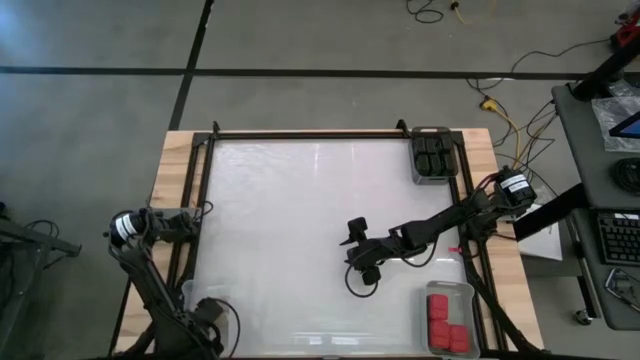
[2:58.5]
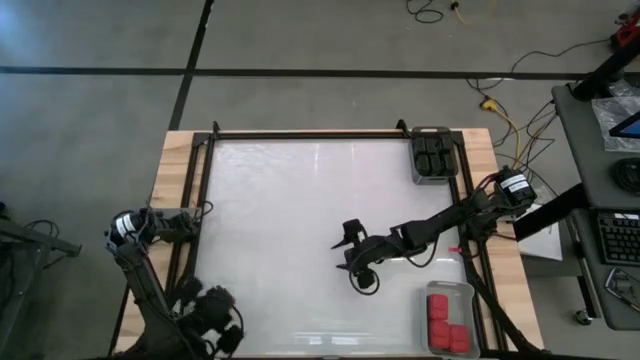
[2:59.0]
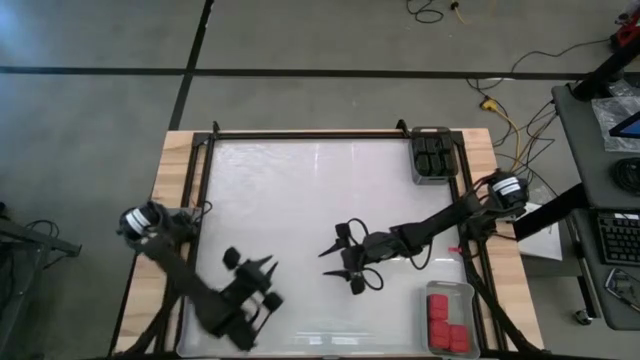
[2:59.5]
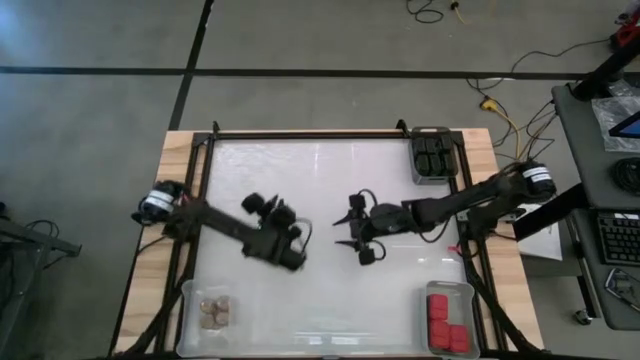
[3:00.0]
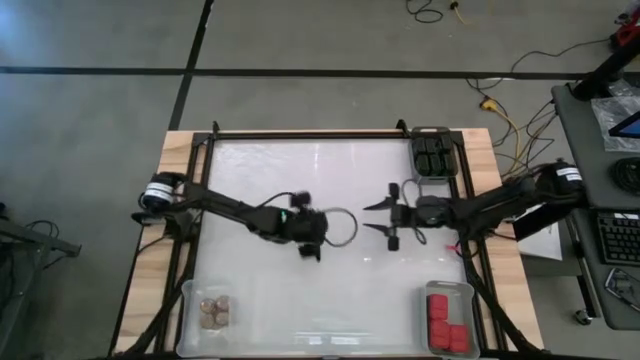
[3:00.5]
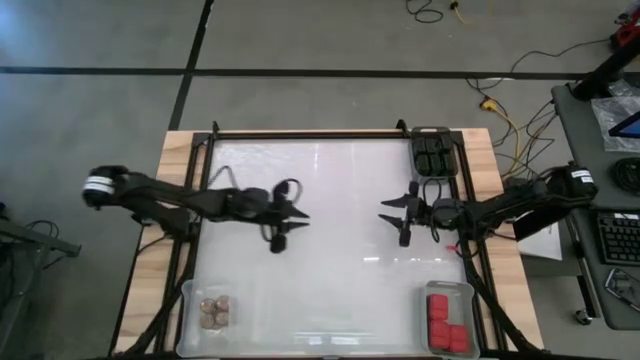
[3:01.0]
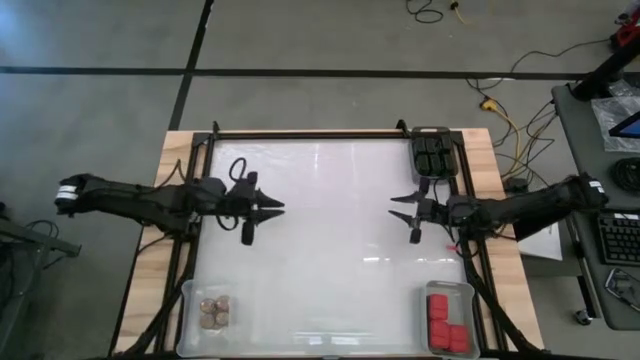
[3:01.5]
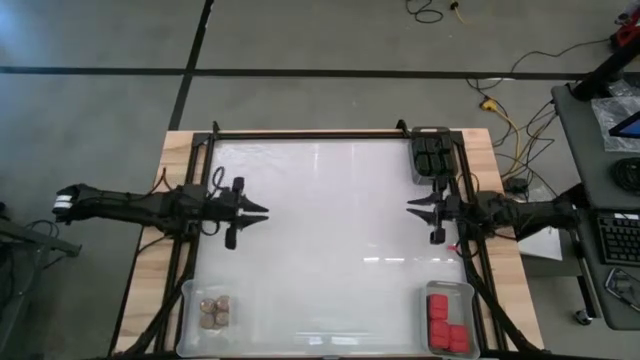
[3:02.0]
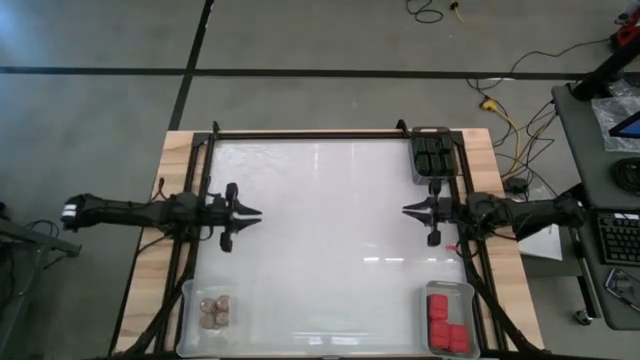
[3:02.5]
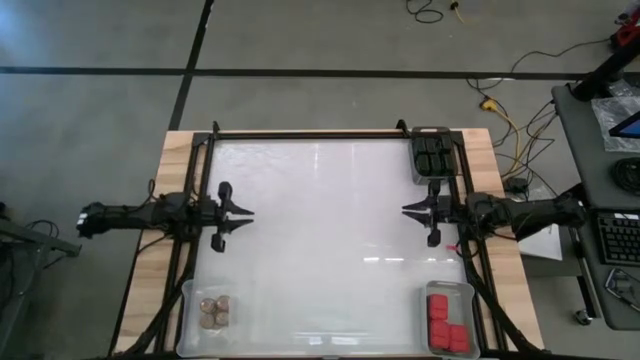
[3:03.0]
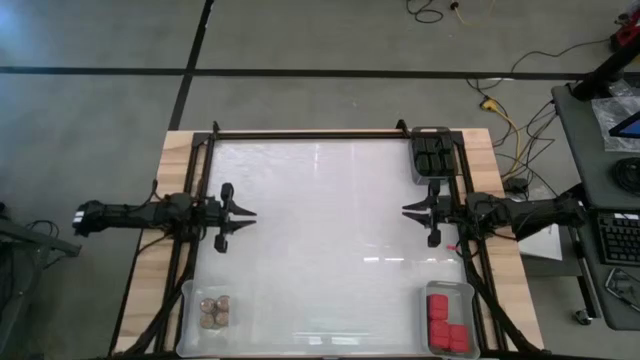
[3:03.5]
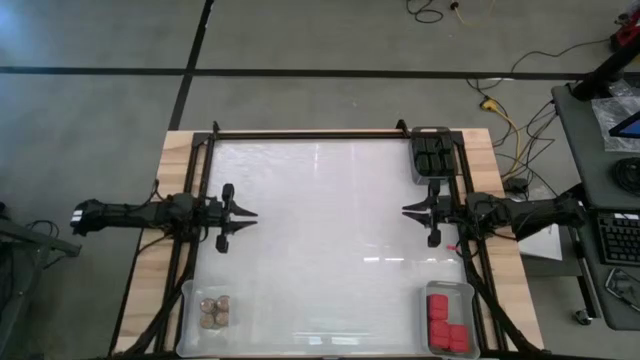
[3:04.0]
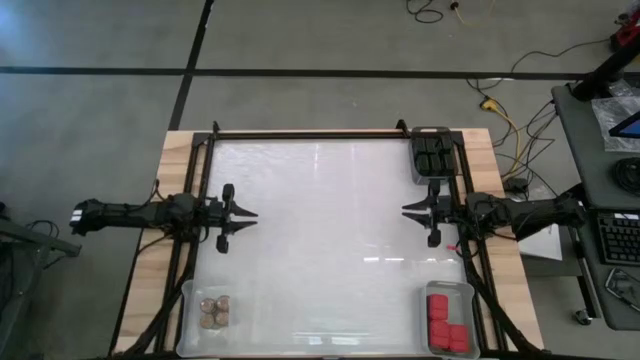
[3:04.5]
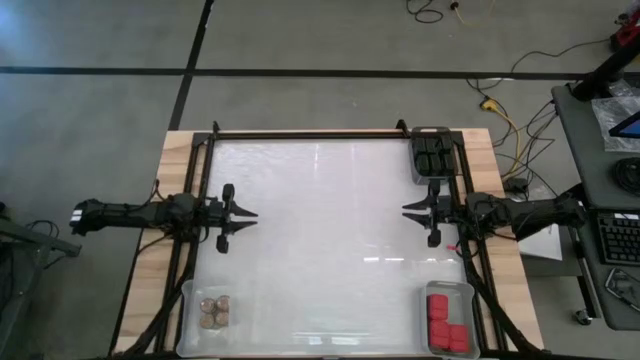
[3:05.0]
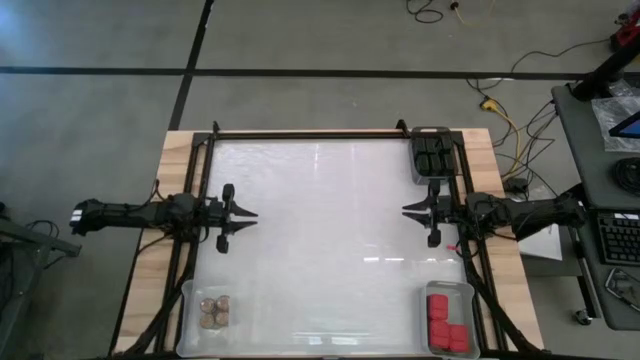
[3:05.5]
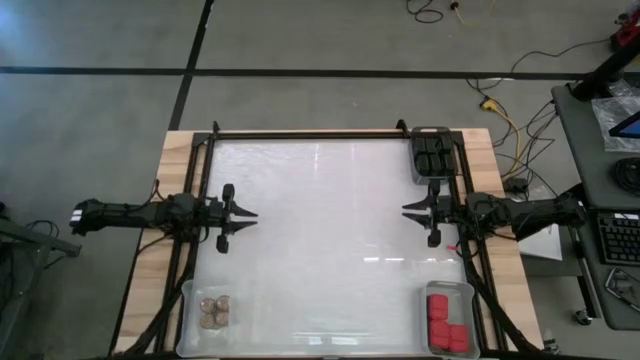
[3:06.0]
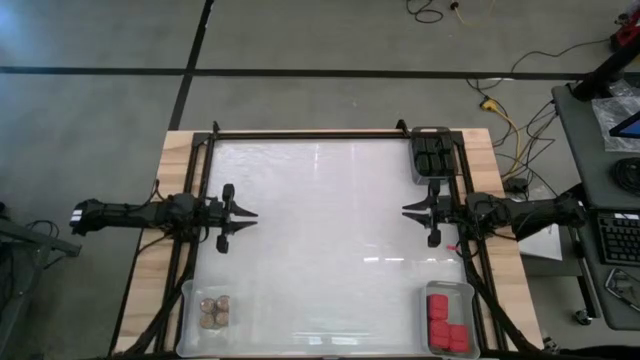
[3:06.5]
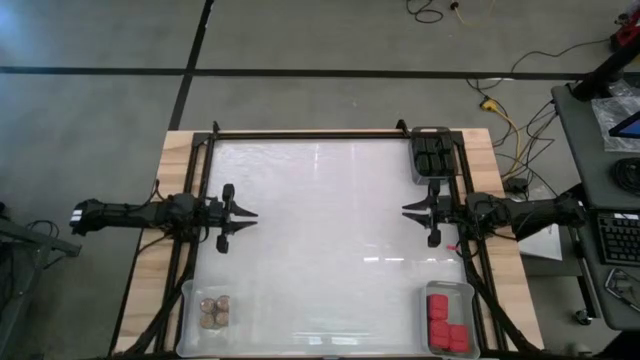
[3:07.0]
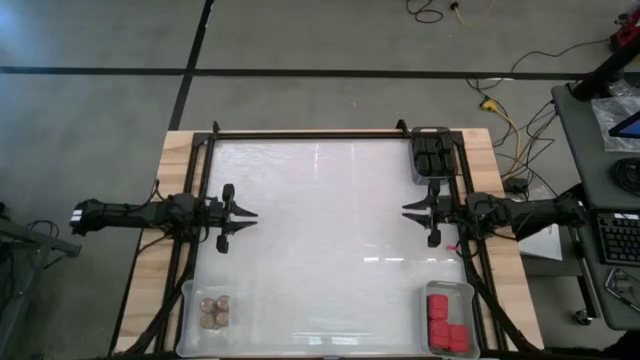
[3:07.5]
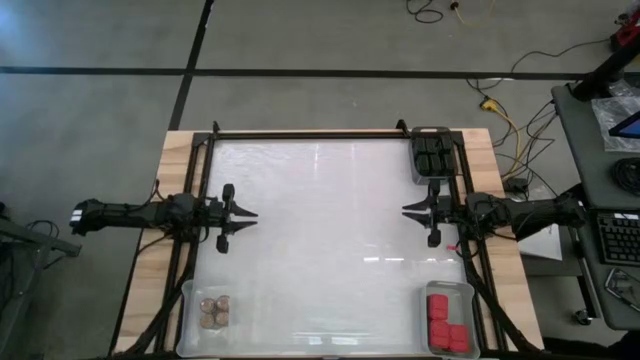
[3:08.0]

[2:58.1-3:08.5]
Task: Sort spices by type
Return to Home Position

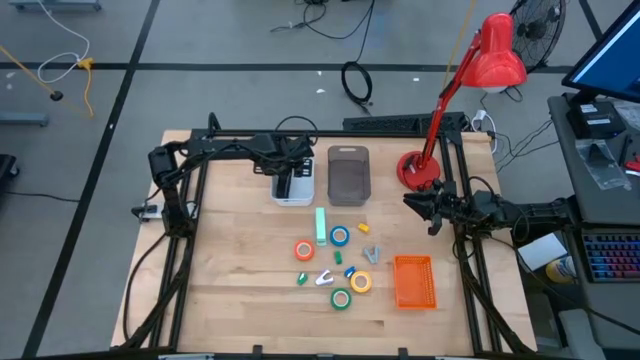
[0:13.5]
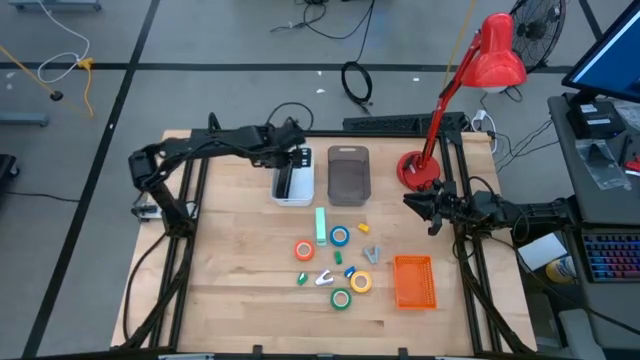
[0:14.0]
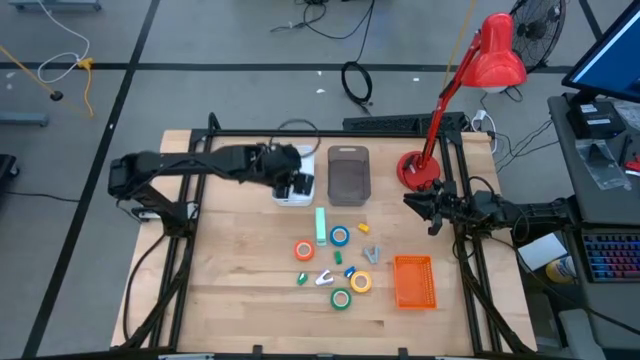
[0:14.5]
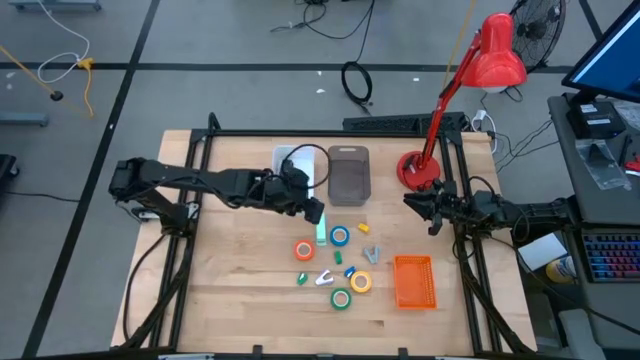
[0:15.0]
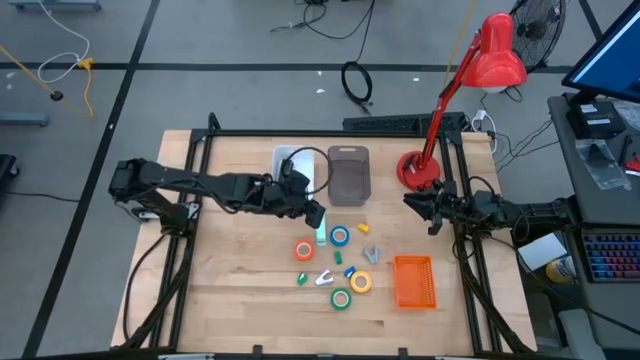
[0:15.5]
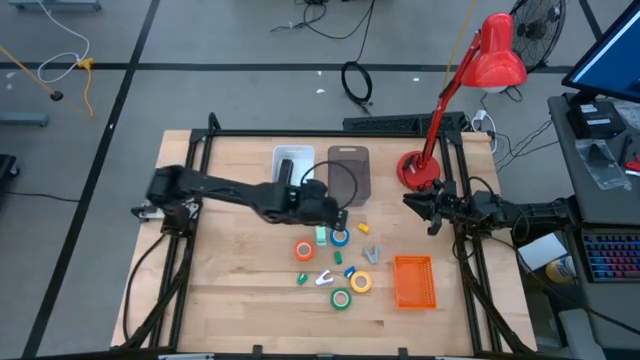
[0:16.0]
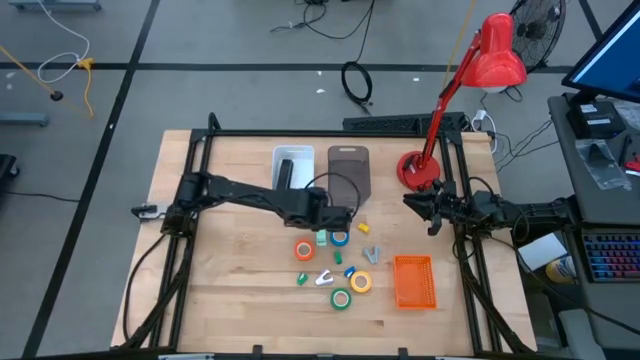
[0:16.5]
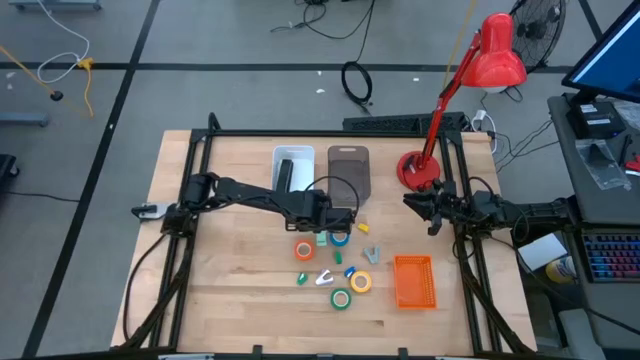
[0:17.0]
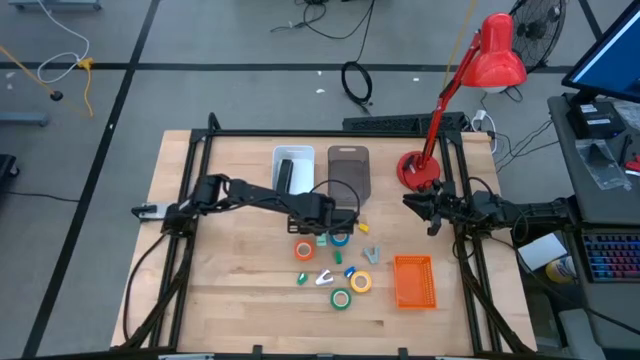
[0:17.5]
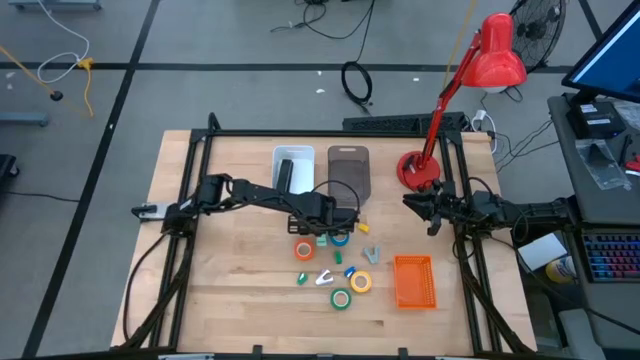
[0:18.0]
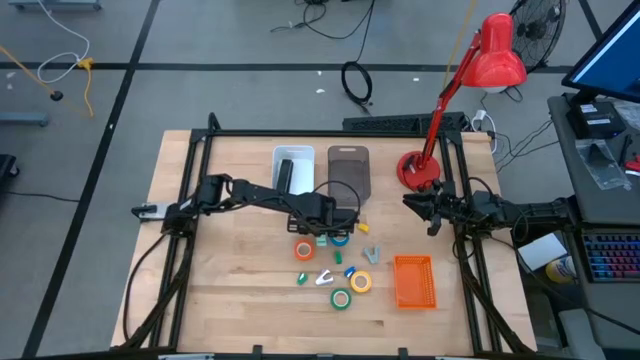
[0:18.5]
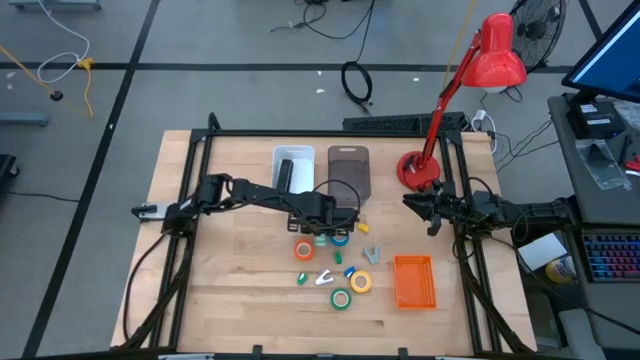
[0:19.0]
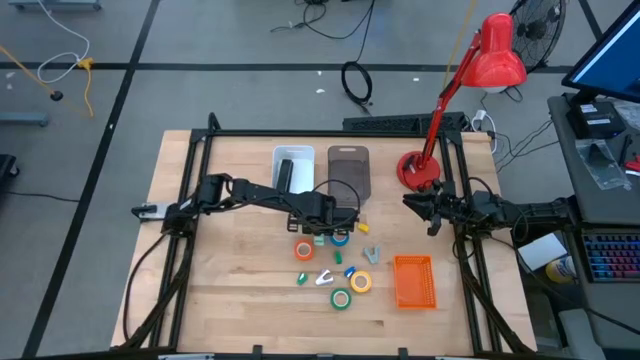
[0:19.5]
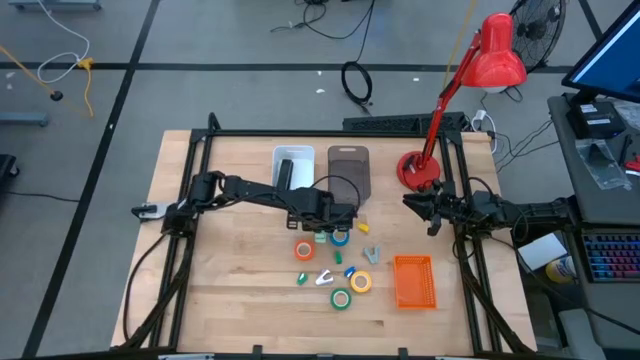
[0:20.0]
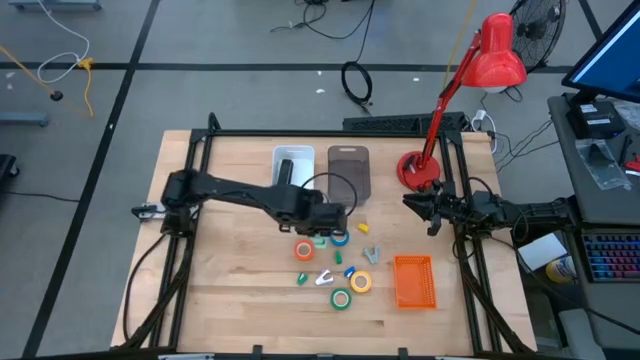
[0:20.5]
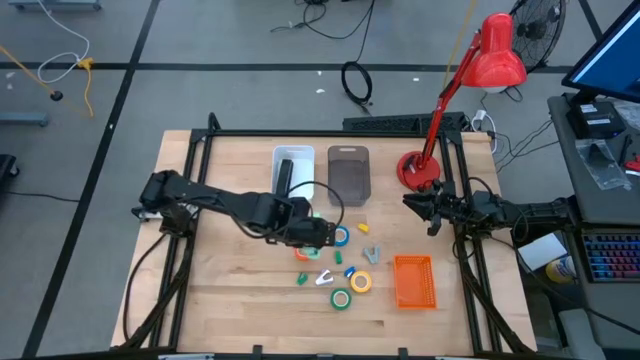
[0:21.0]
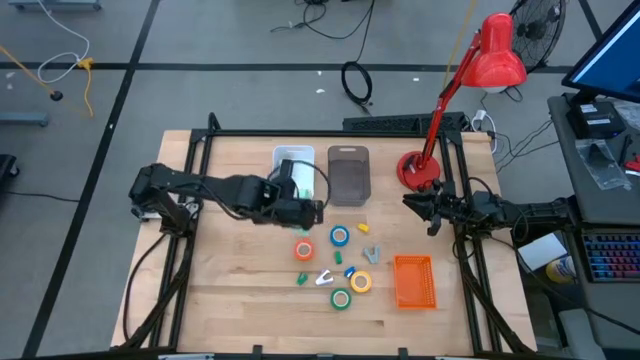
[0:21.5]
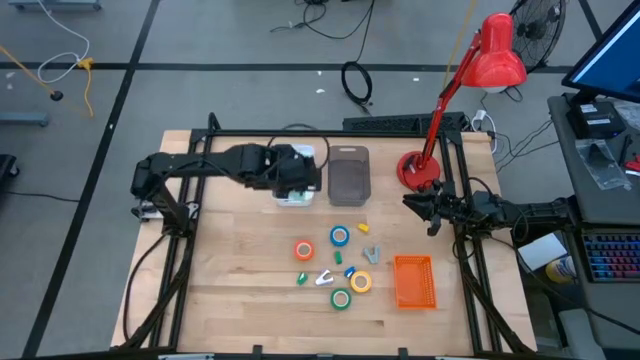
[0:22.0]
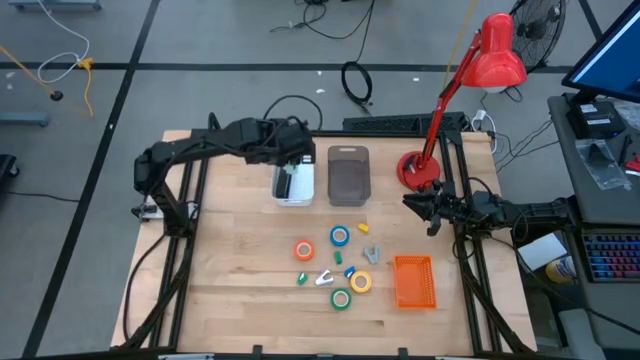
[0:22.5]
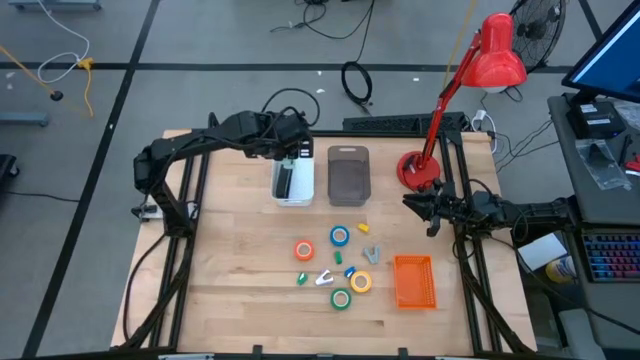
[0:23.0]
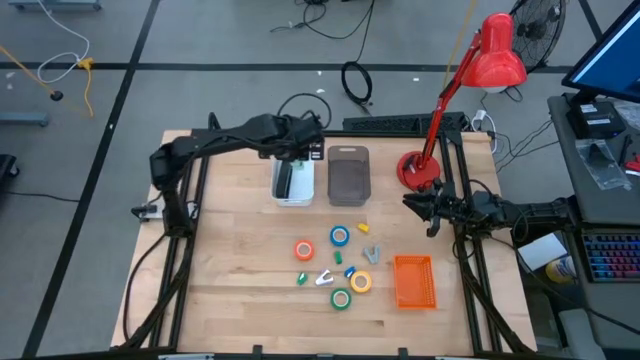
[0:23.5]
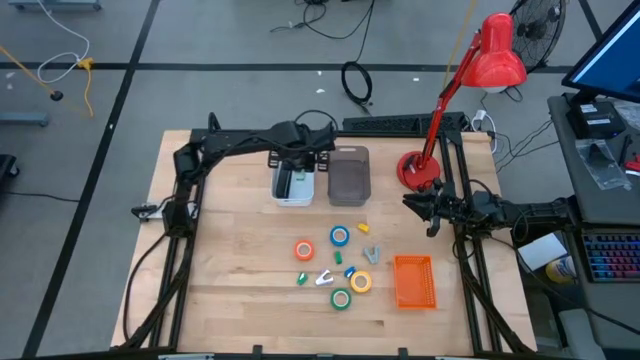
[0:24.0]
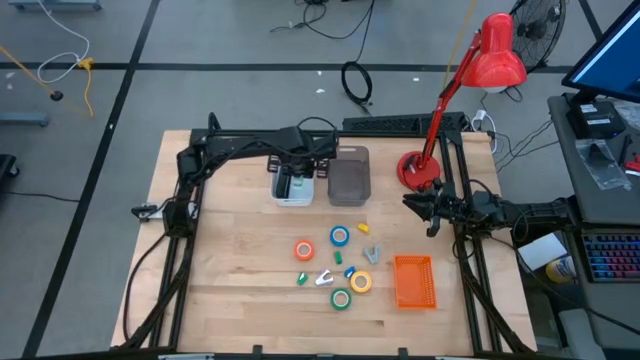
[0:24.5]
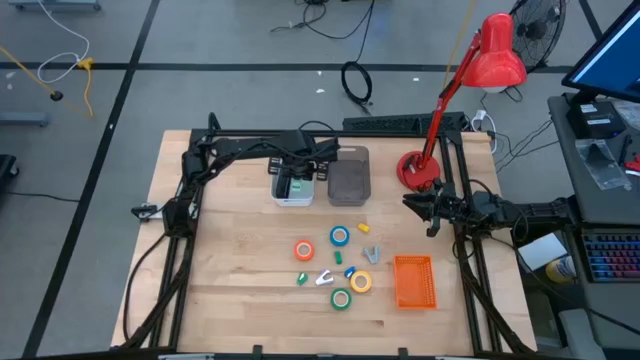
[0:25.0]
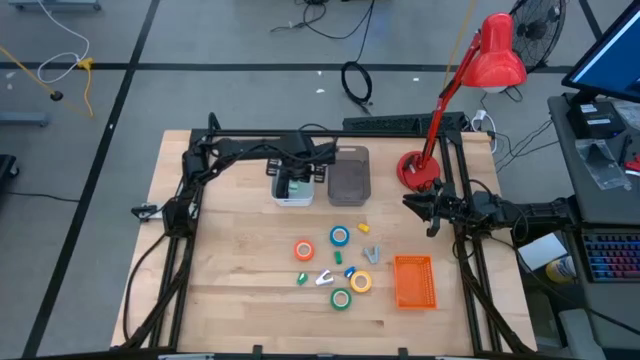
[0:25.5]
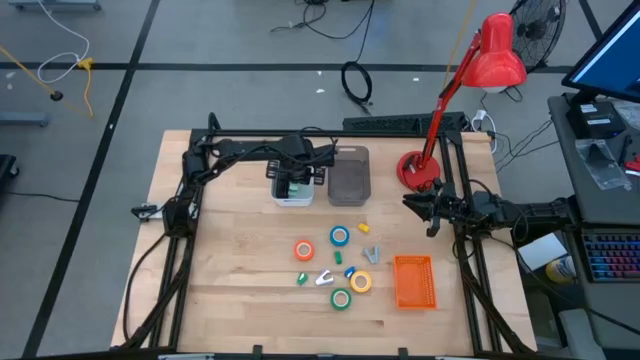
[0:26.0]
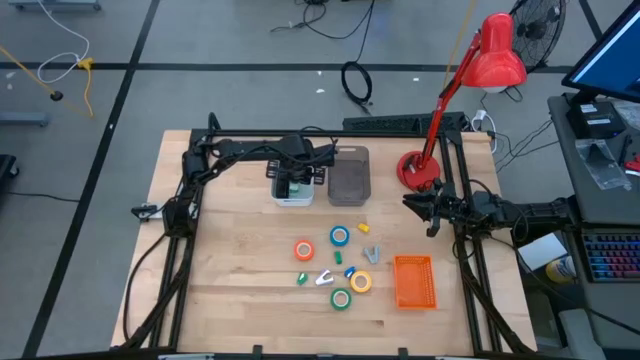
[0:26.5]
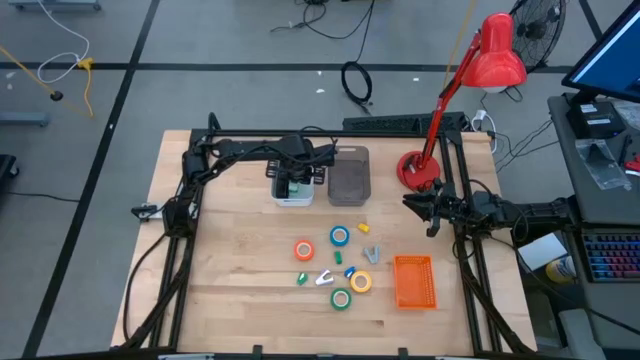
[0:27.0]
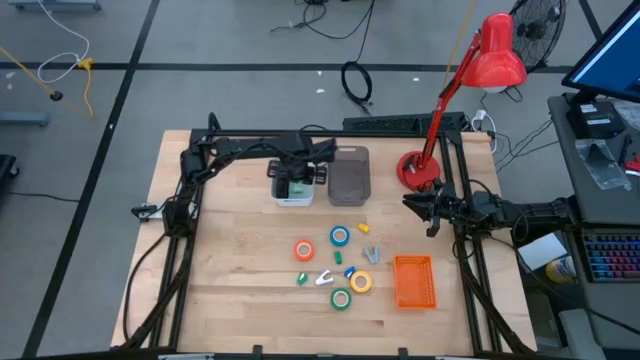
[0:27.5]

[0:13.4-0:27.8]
Task: Pick and place Stapler, Stapler remover, tape
Put the light green stapler into the white bin
